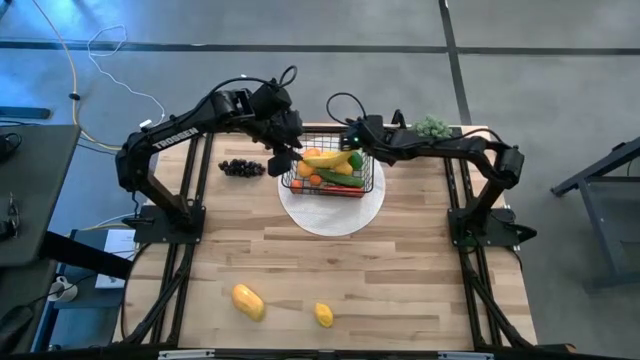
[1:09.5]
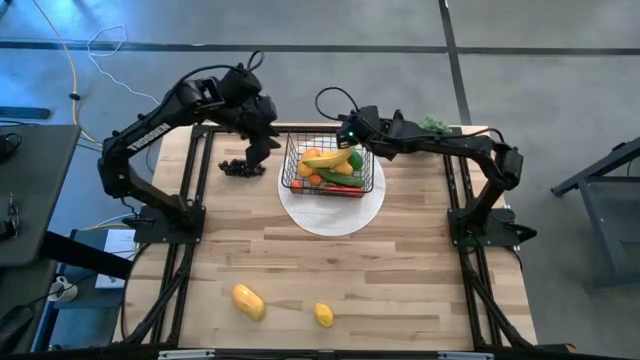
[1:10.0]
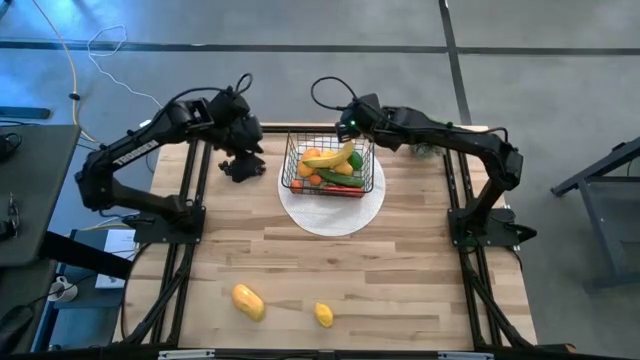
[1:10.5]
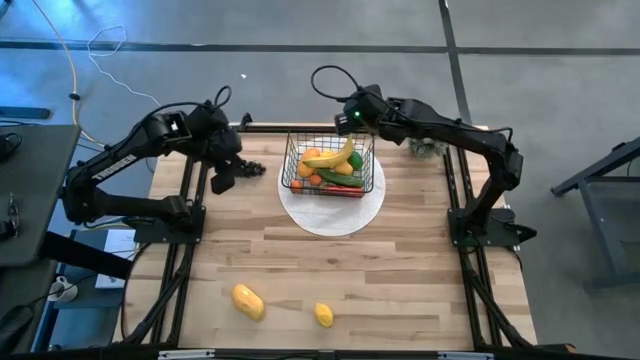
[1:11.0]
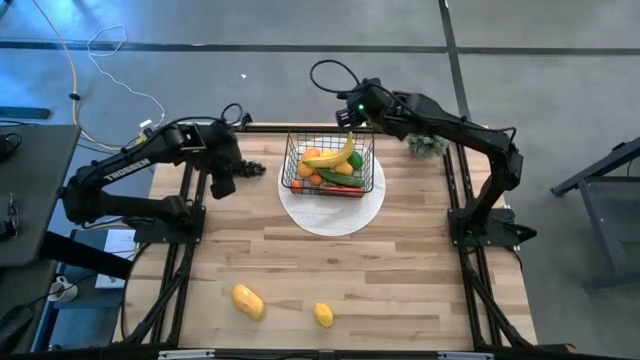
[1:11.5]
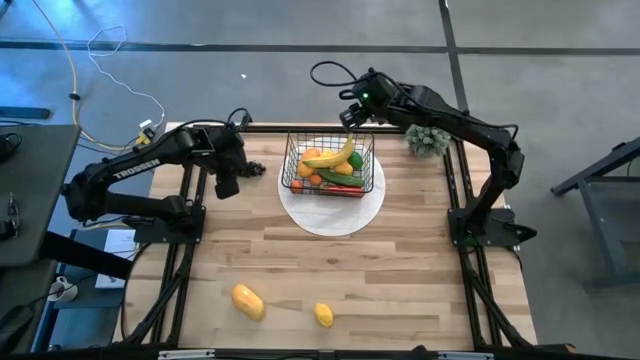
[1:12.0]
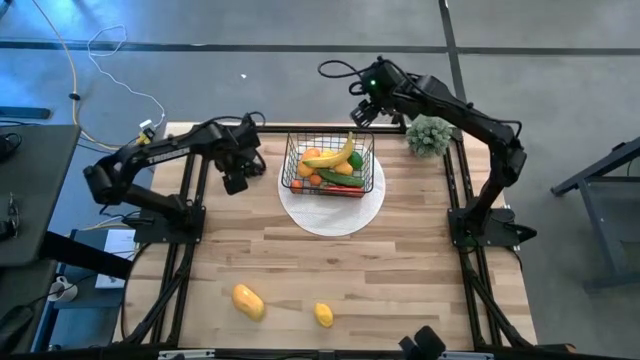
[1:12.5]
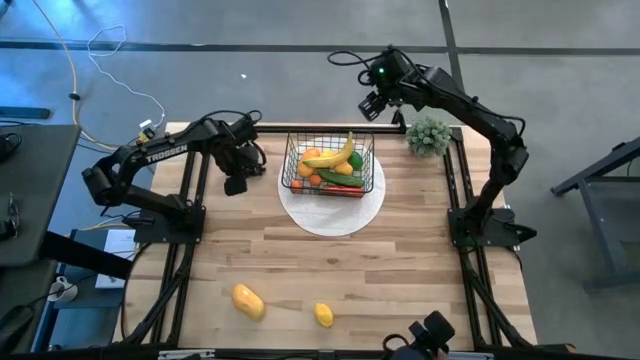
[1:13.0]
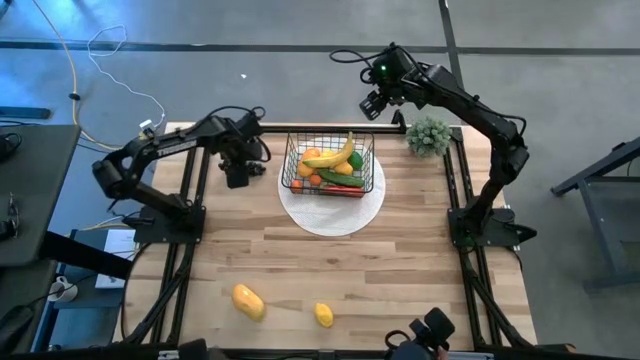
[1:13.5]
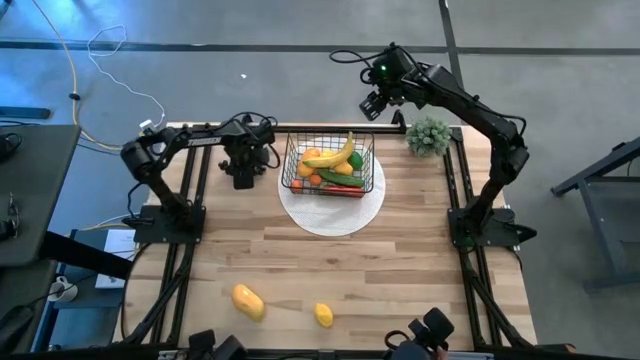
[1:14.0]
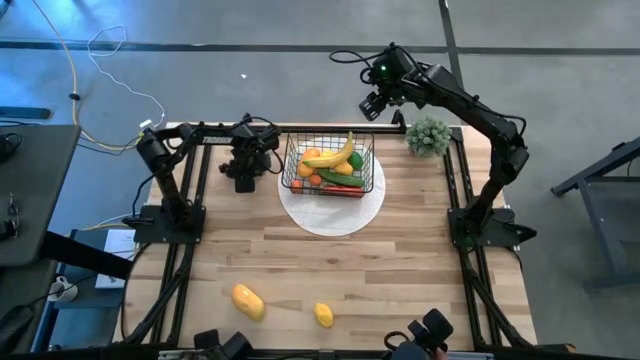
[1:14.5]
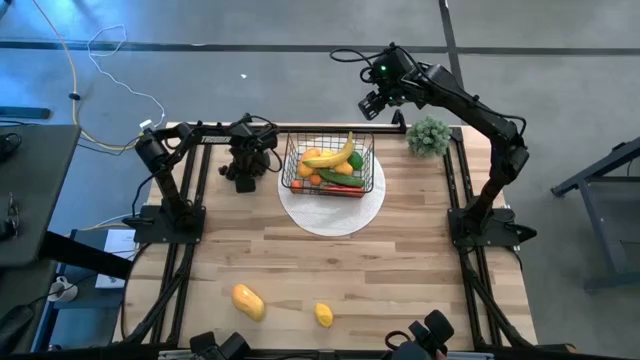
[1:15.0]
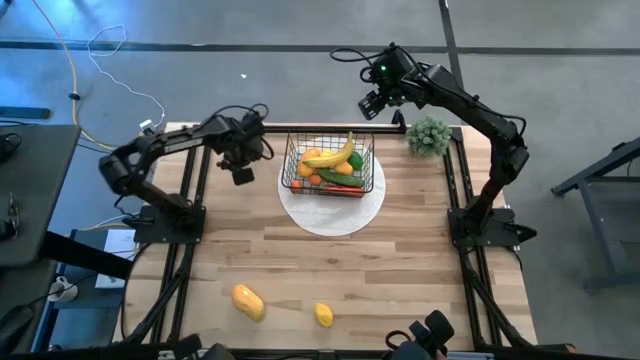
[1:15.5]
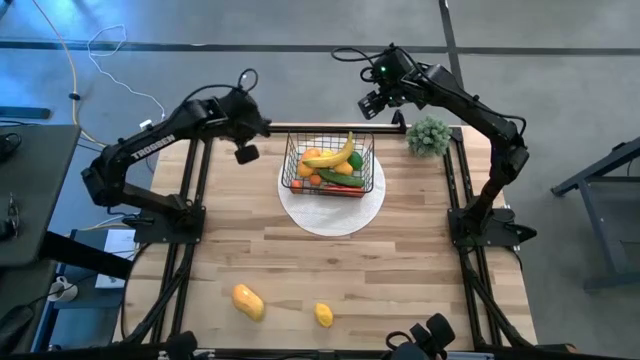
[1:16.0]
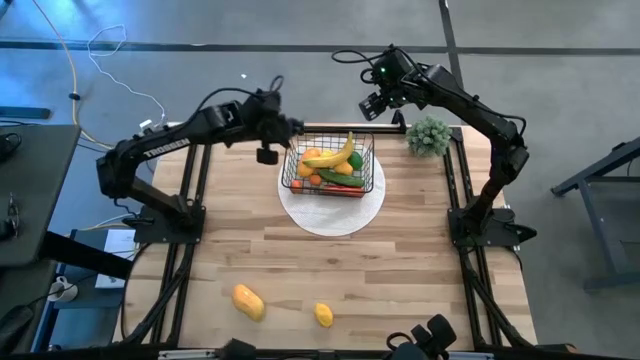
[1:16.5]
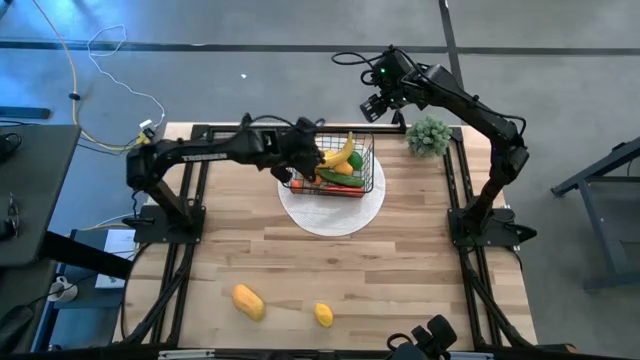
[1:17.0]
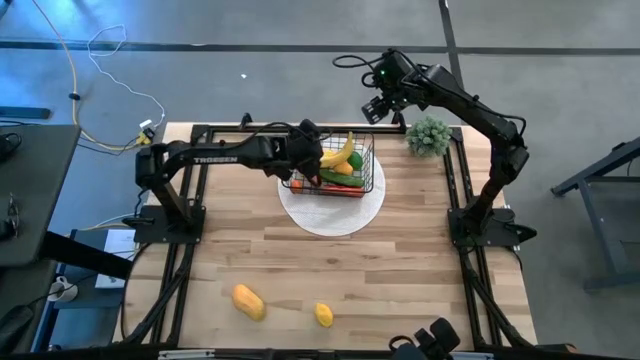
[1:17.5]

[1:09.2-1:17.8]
Task: Build produce basket
Put the purple grapes into the wire basket

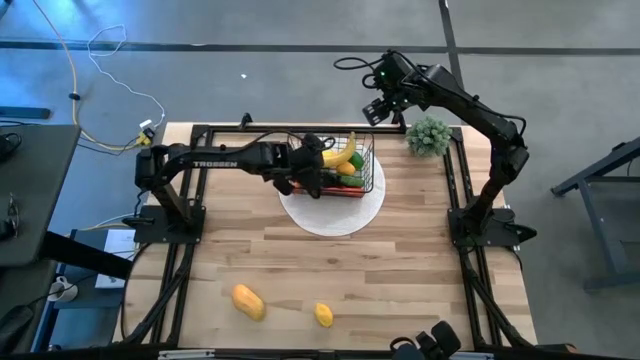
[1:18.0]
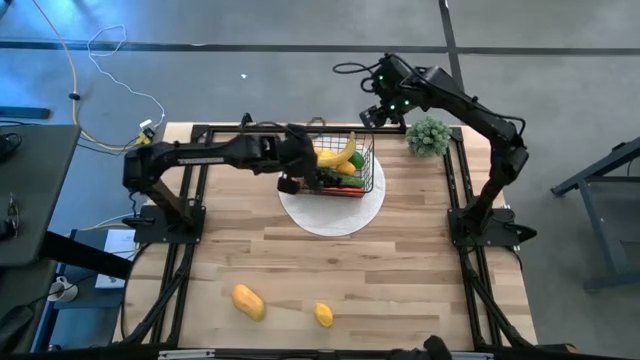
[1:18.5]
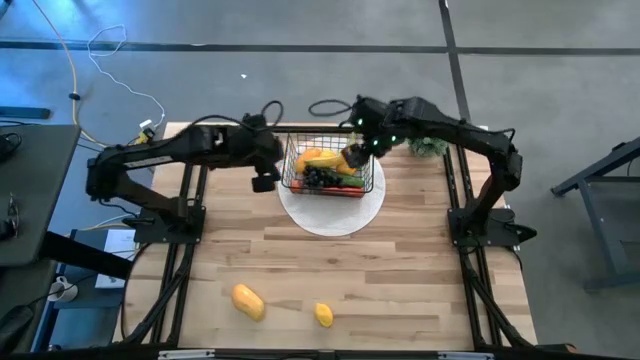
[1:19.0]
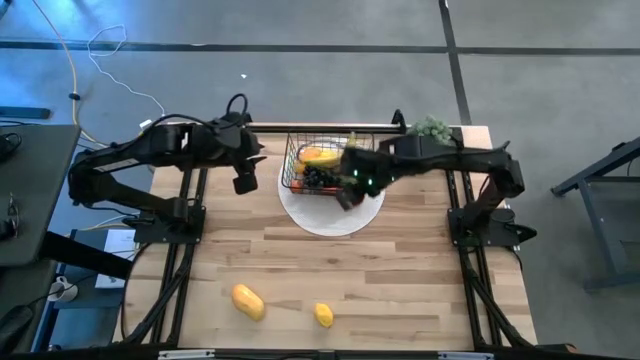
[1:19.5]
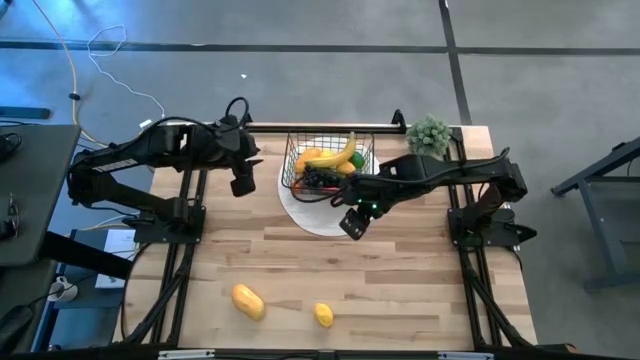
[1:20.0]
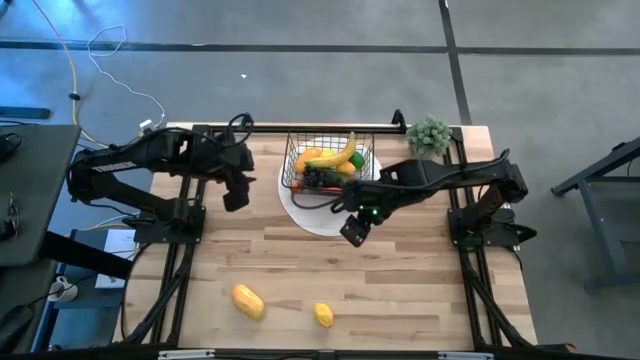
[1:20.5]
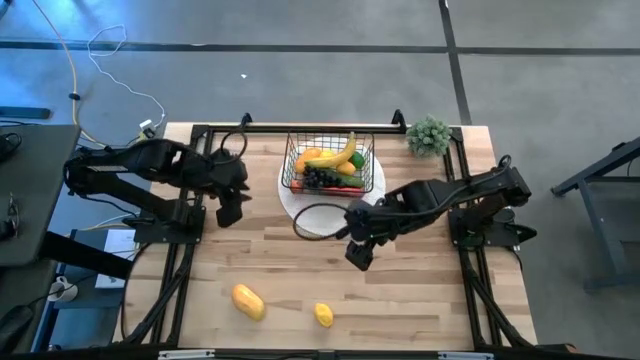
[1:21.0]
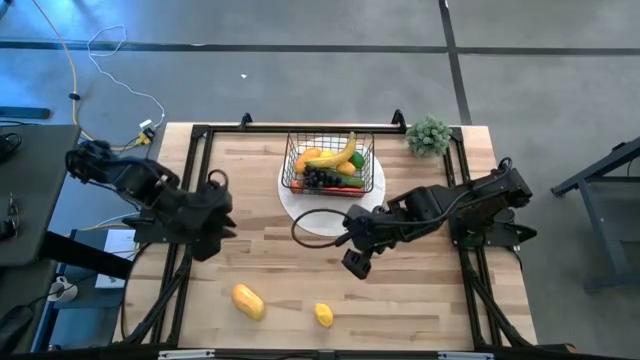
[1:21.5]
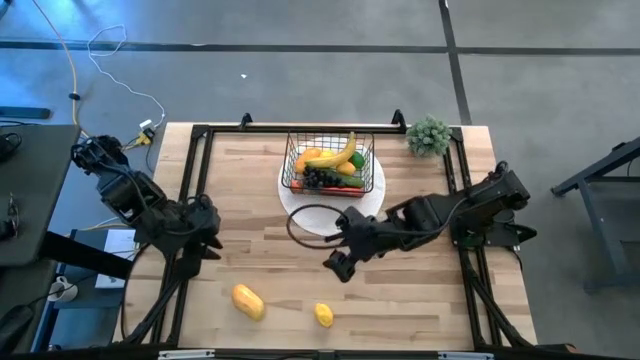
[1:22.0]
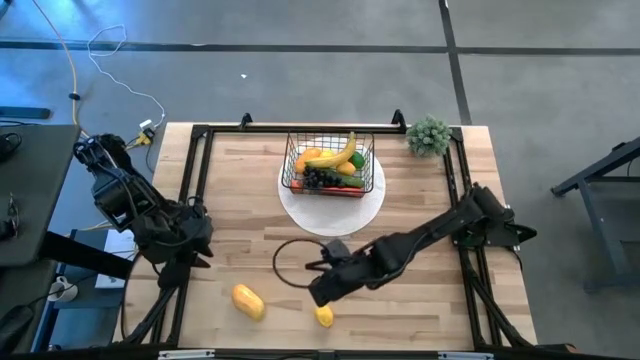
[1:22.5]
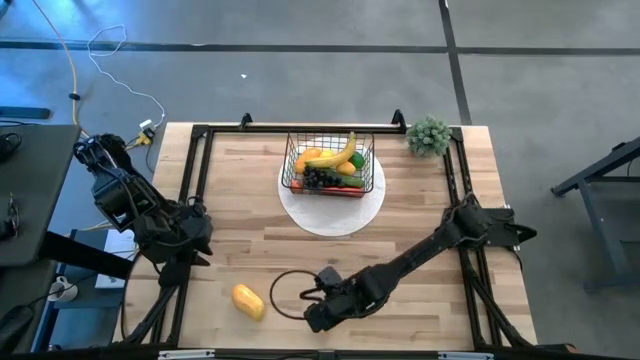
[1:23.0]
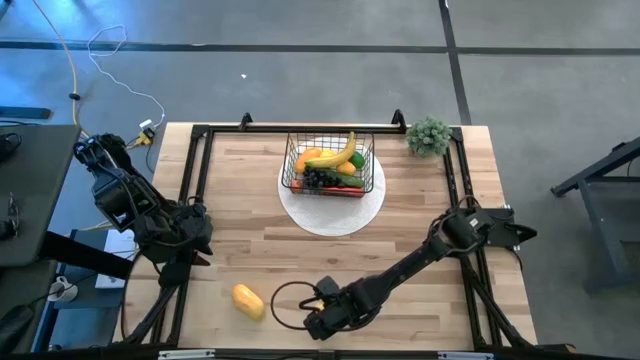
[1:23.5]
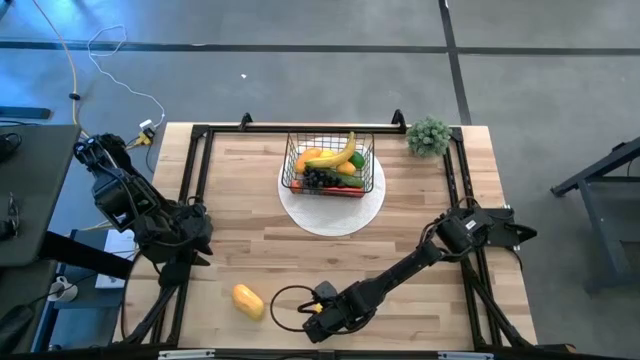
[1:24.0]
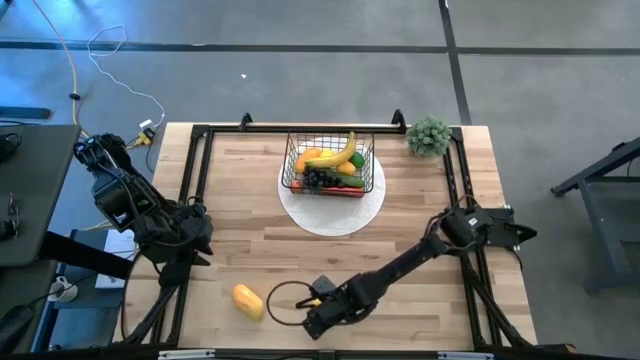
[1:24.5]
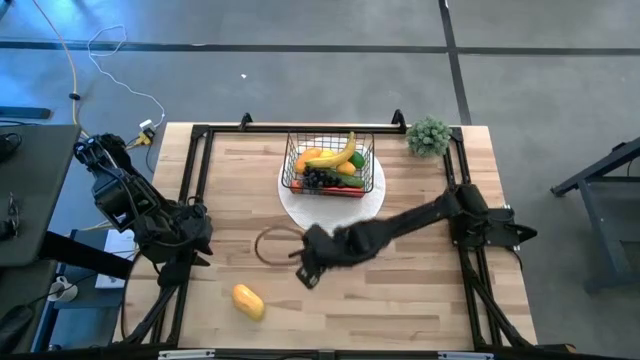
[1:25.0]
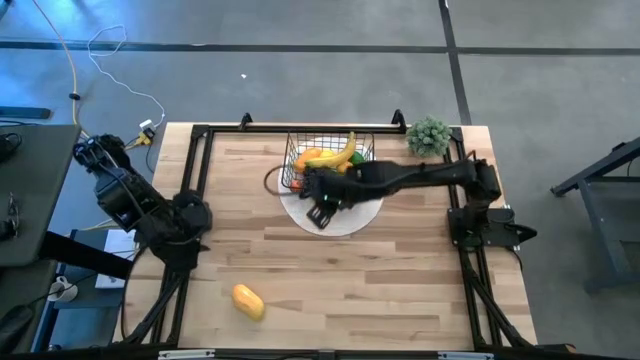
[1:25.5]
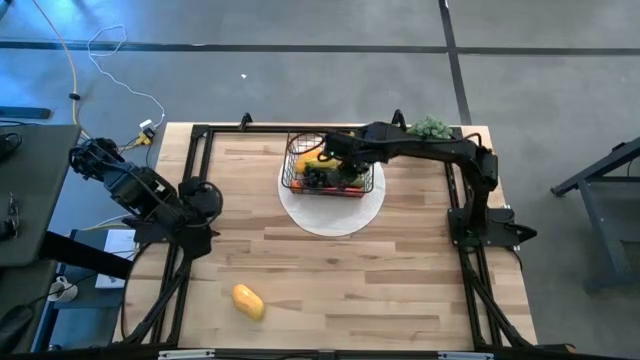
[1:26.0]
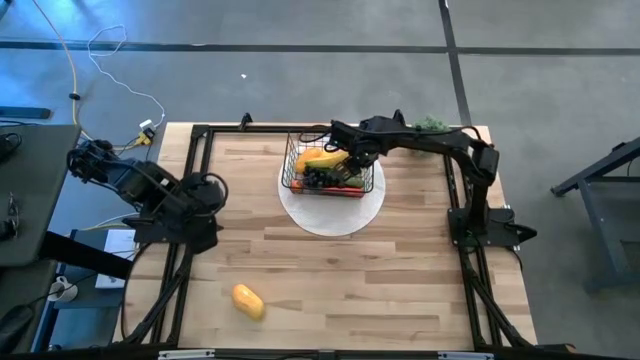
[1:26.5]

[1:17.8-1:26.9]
Put the yellow lemon into the wire basket

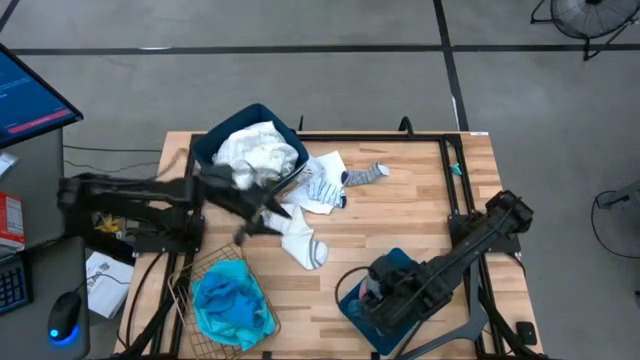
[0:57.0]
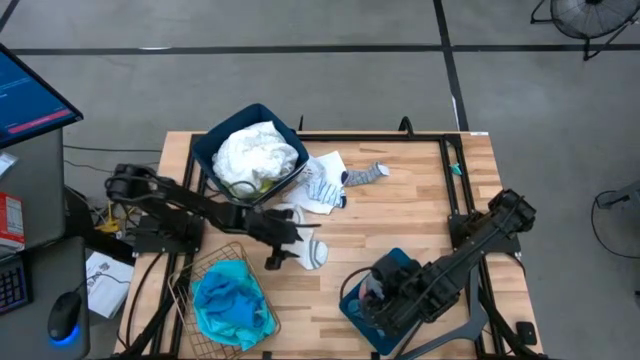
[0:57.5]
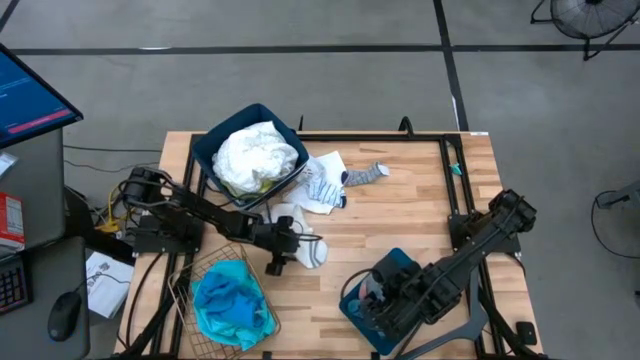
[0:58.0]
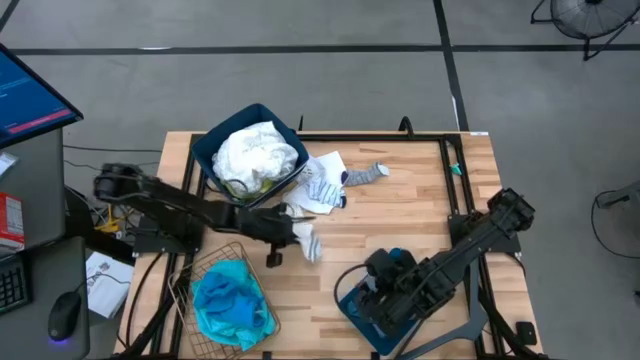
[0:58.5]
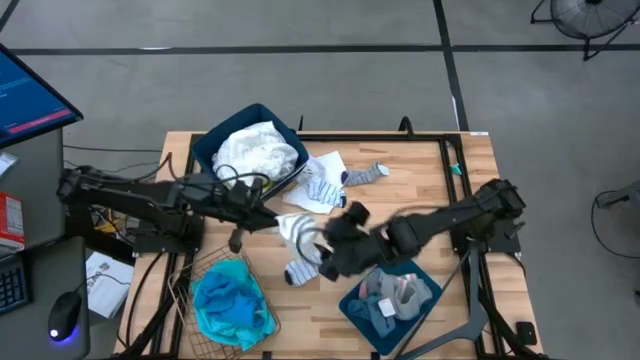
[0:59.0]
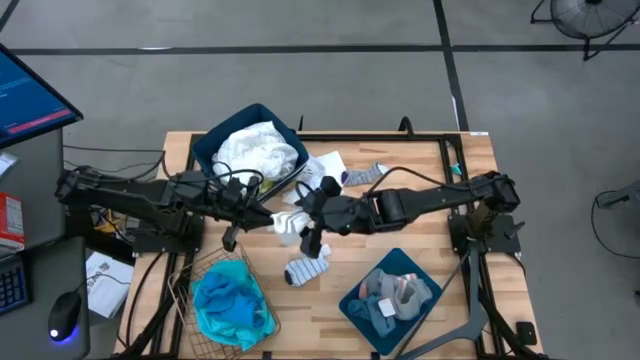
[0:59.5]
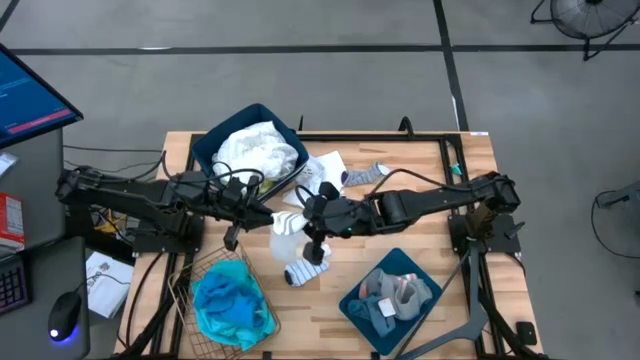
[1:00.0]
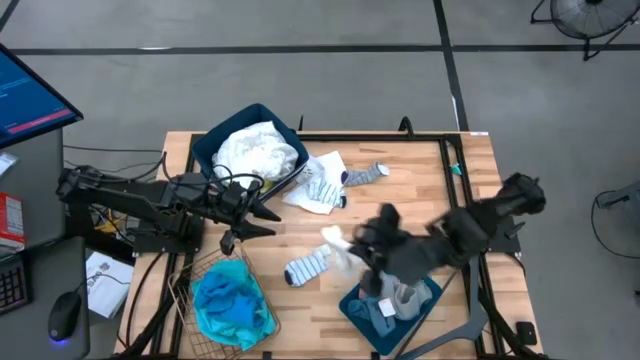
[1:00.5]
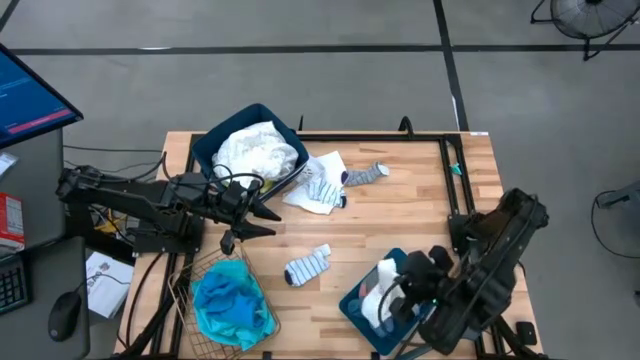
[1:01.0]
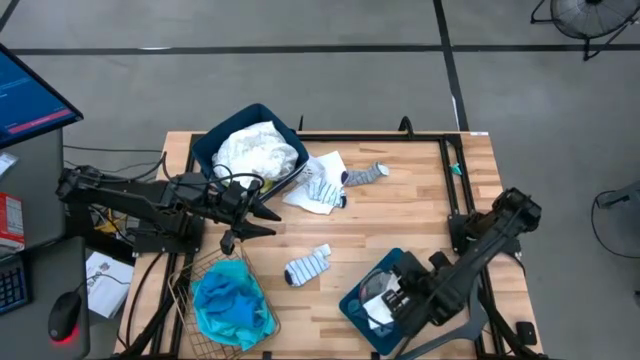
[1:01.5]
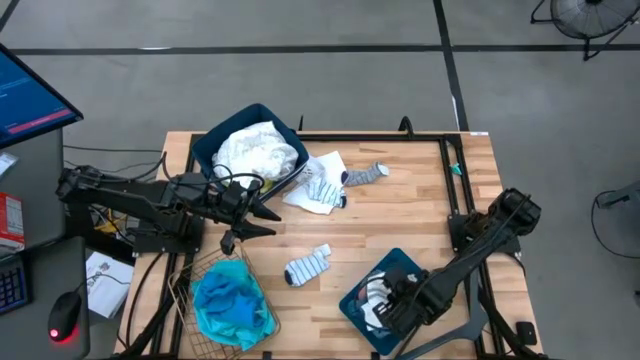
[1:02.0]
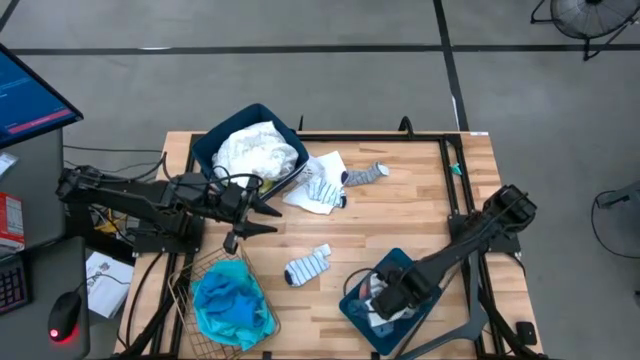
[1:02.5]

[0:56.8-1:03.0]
Task: Pick & Place Cloths
Put the white sock into the blue bin
